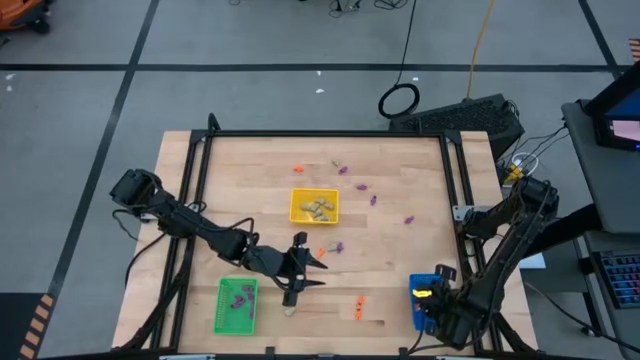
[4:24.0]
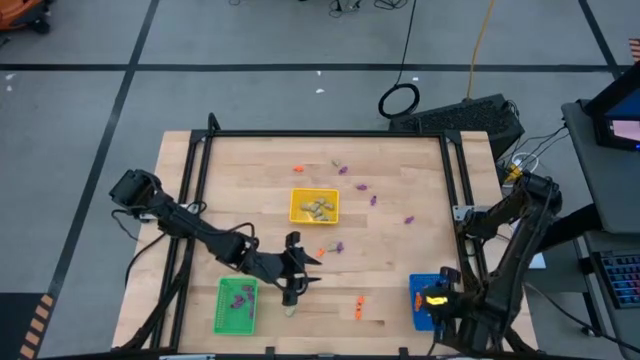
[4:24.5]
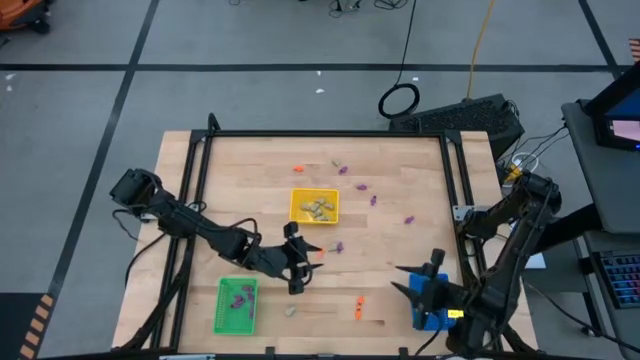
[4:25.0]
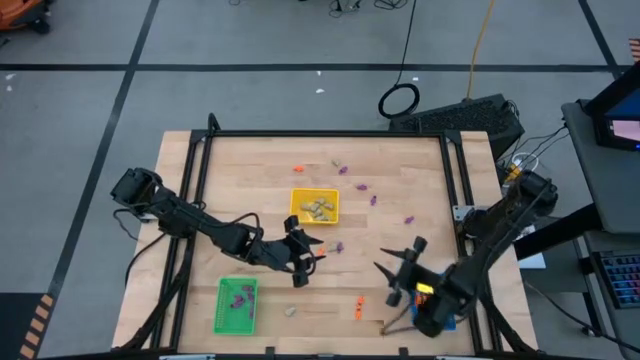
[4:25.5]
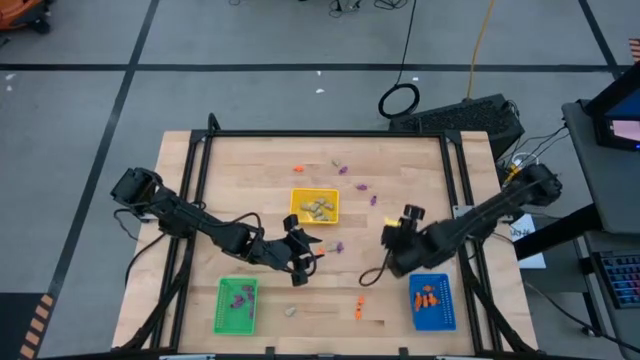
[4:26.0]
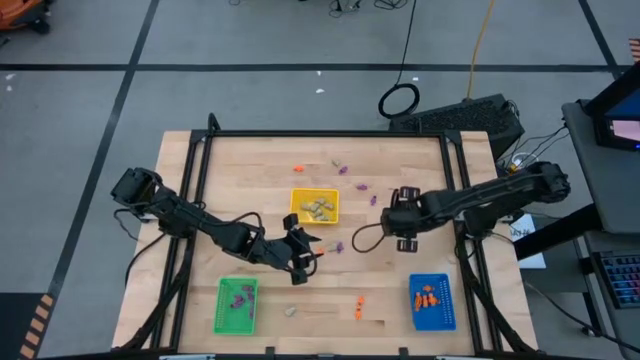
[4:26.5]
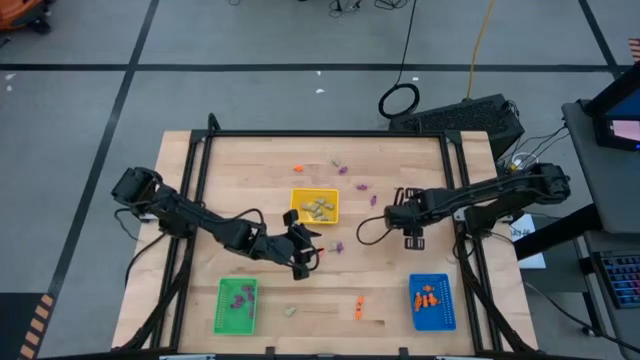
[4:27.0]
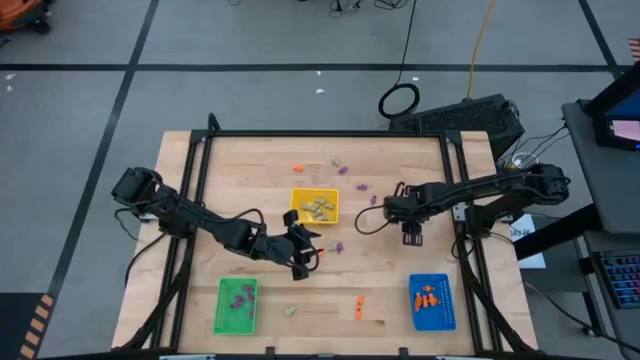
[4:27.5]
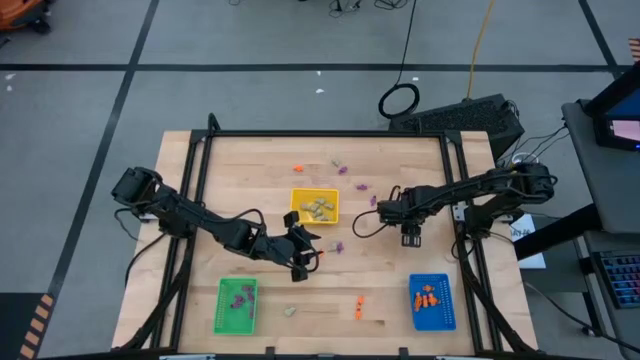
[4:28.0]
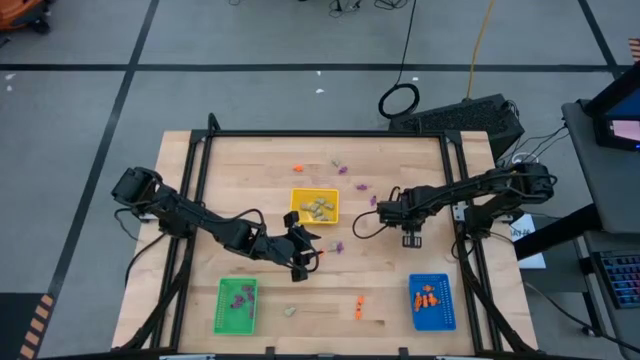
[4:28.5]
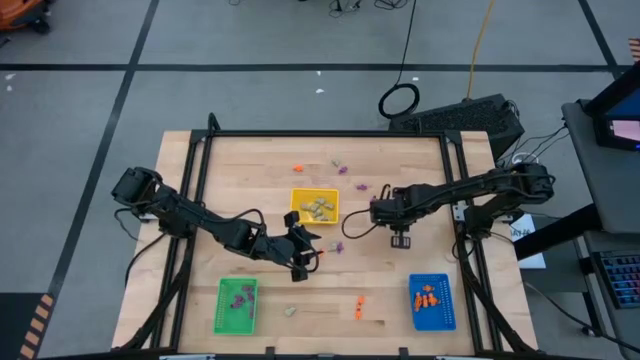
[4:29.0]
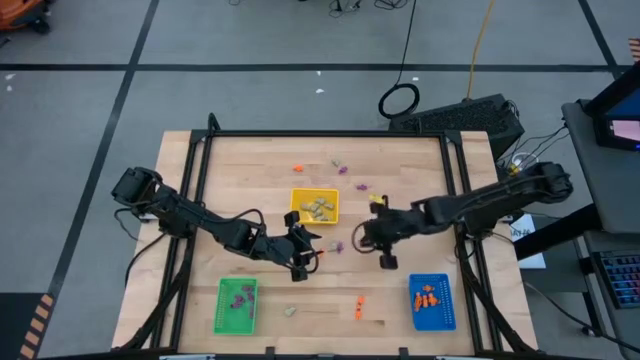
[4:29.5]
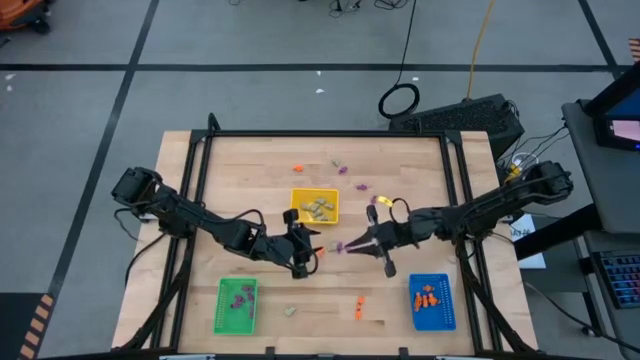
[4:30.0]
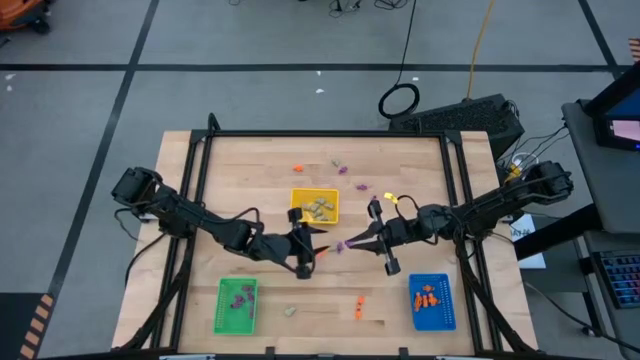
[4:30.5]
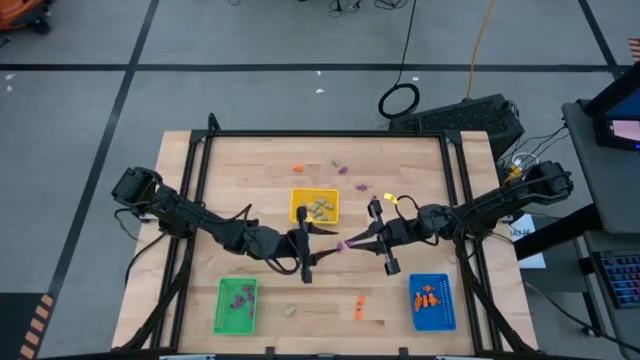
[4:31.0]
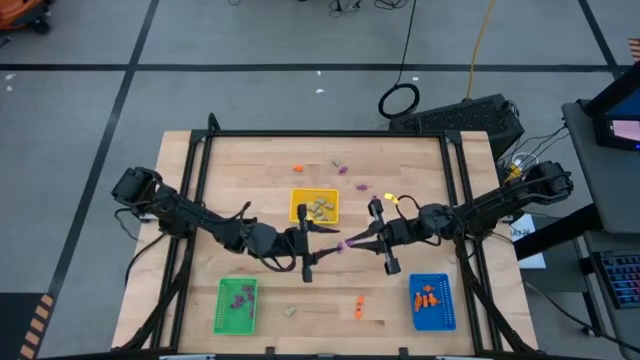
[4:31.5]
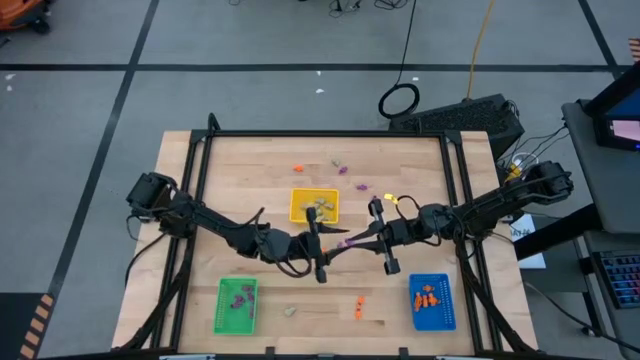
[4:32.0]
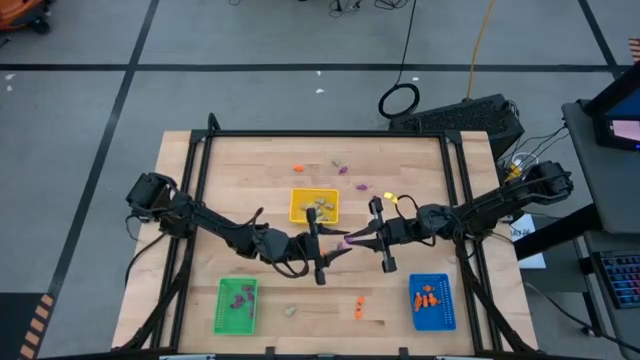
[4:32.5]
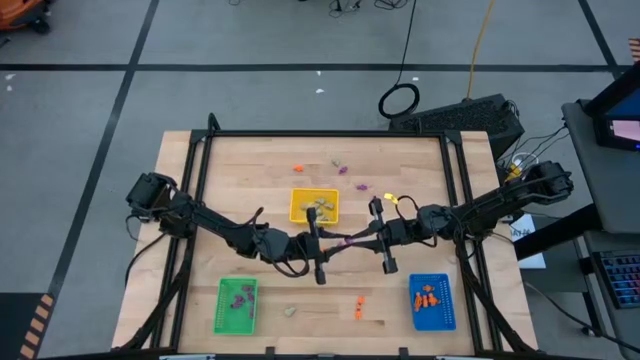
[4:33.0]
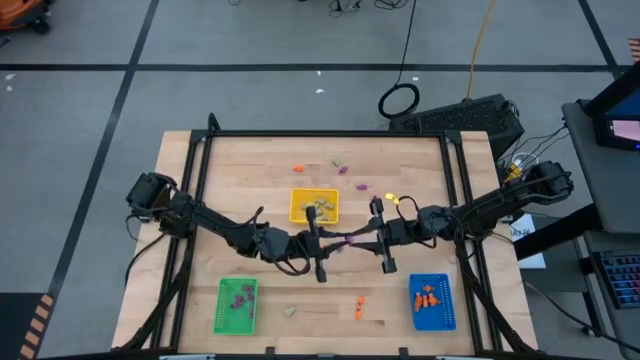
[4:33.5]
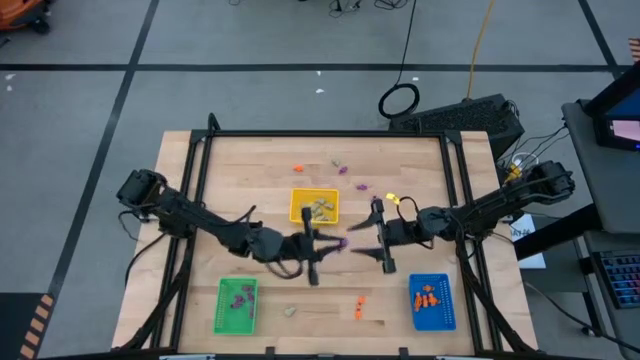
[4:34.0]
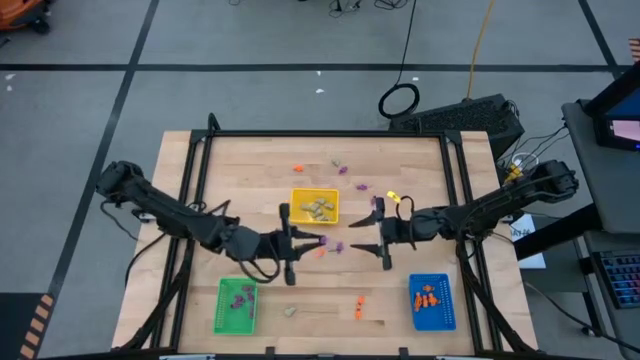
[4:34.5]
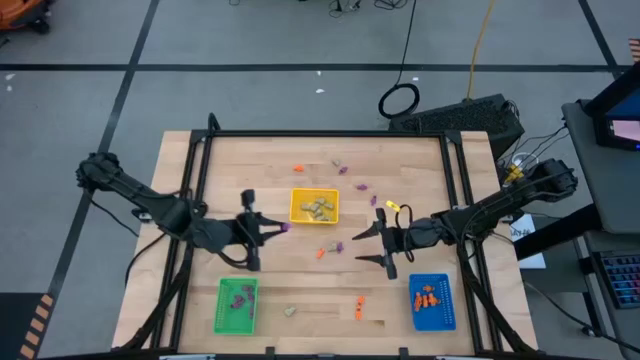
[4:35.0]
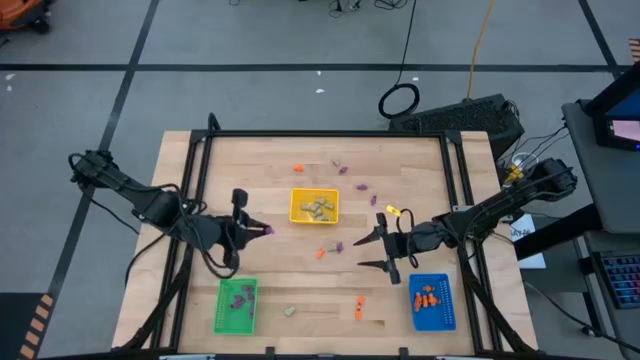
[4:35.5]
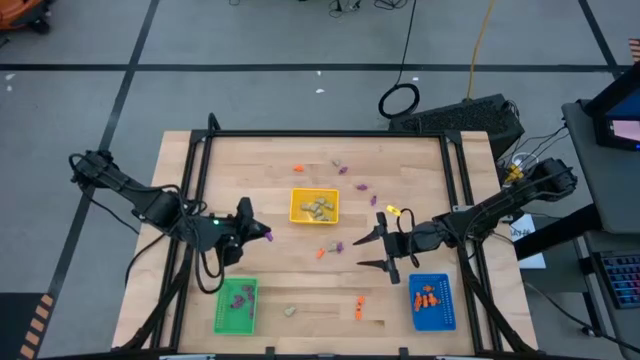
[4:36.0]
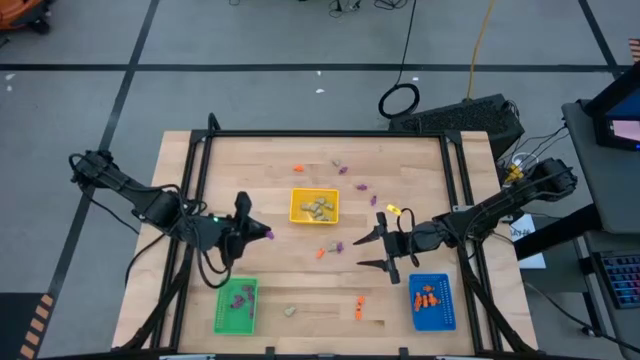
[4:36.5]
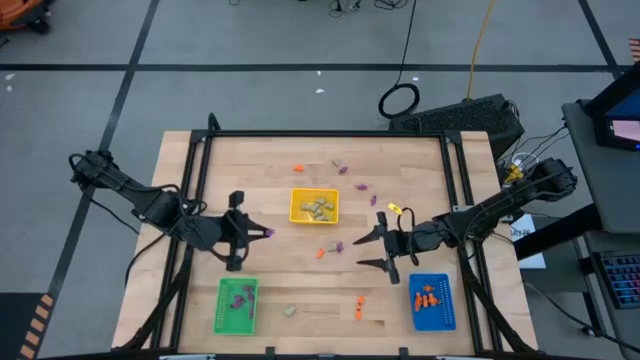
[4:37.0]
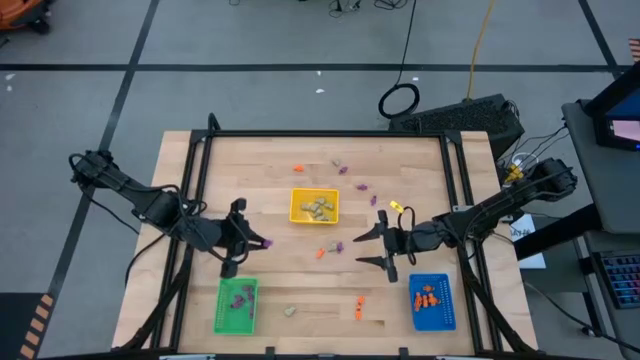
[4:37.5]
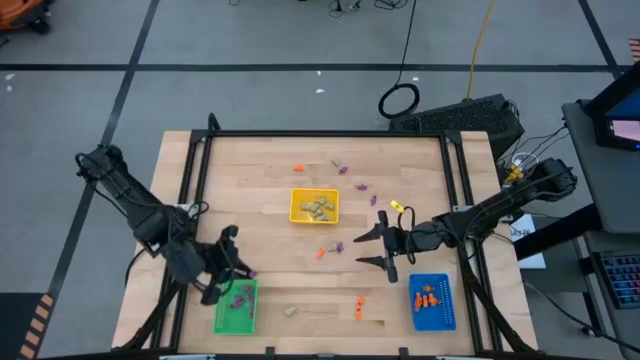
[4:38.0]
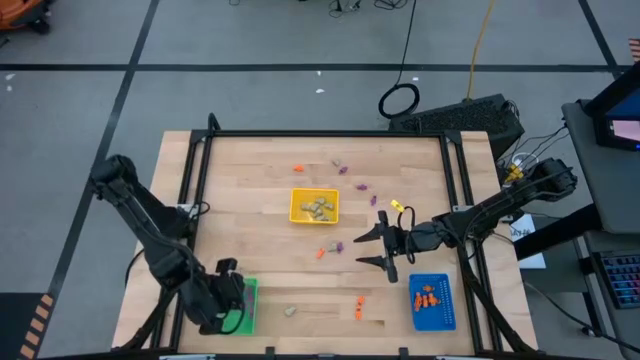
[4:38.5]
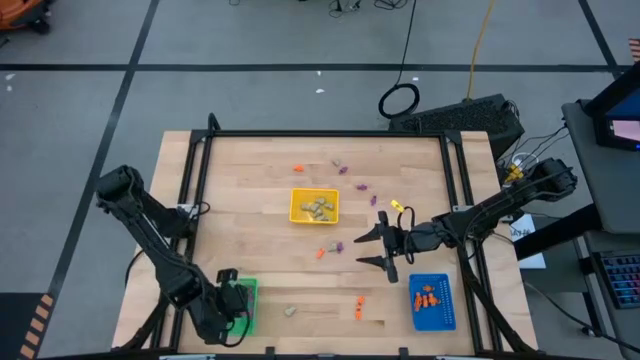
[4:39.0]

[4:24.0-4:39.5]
Task: Sort Halloween decoration
Put the purple skeleton toy in the green basket
